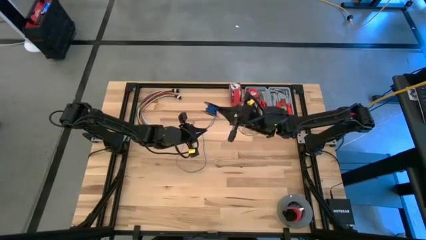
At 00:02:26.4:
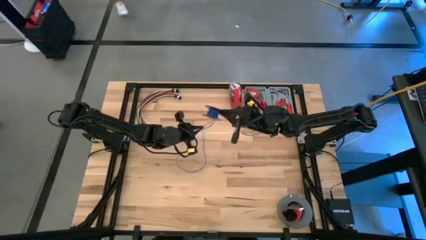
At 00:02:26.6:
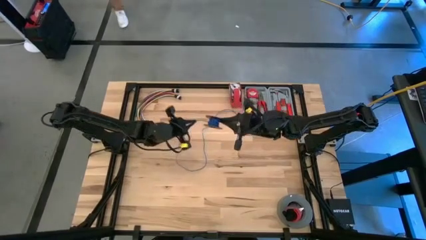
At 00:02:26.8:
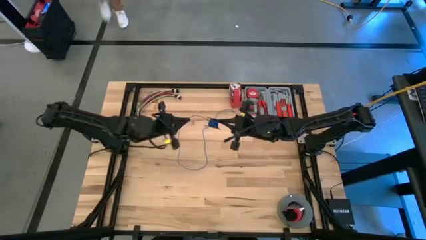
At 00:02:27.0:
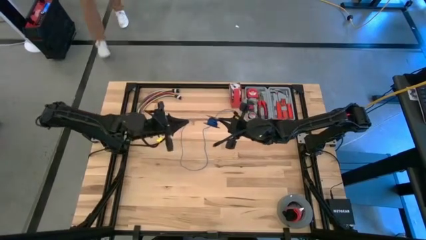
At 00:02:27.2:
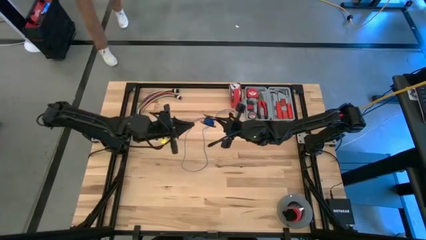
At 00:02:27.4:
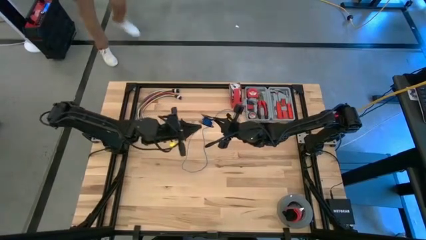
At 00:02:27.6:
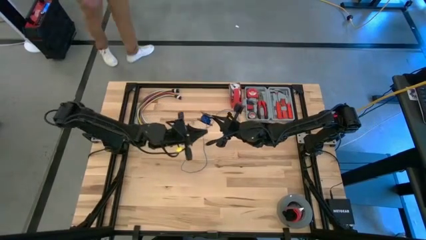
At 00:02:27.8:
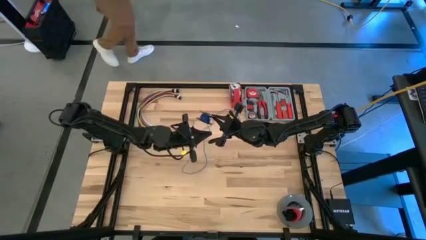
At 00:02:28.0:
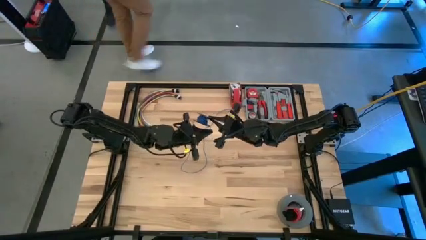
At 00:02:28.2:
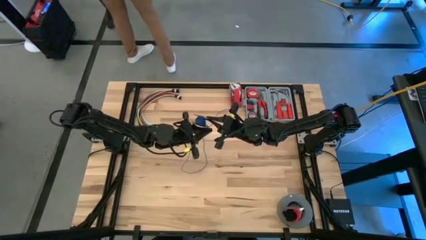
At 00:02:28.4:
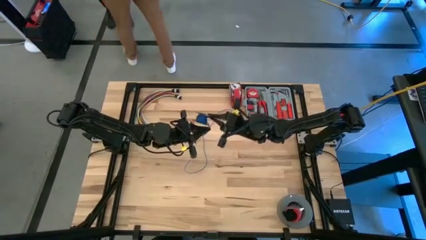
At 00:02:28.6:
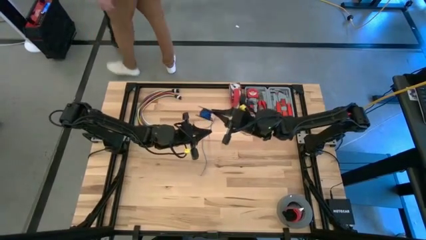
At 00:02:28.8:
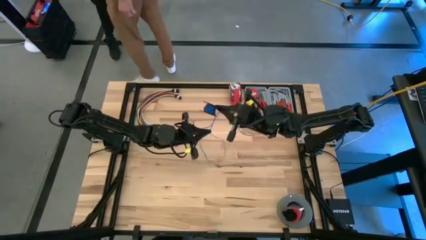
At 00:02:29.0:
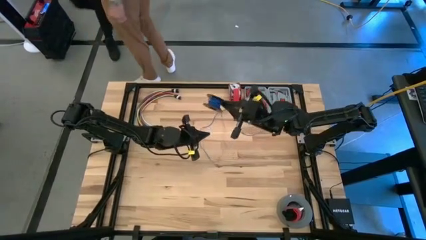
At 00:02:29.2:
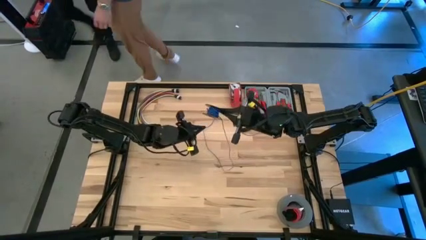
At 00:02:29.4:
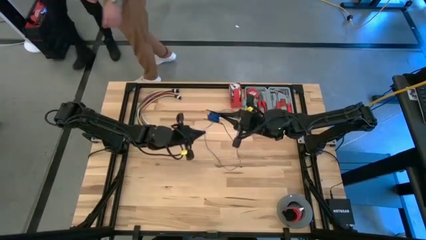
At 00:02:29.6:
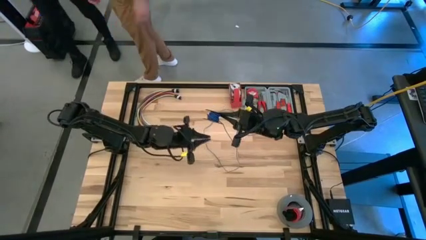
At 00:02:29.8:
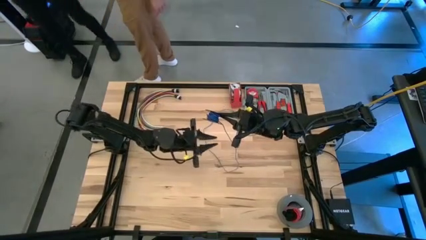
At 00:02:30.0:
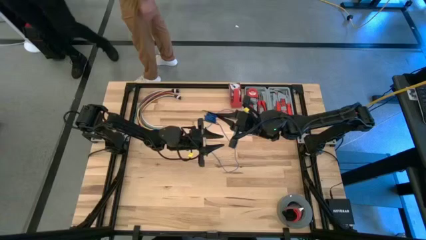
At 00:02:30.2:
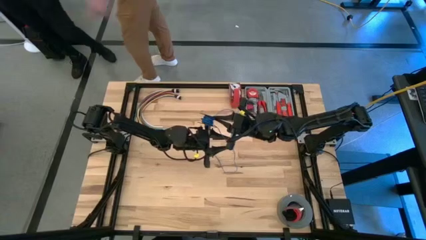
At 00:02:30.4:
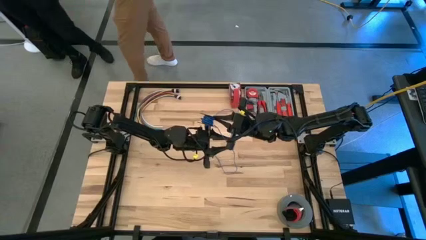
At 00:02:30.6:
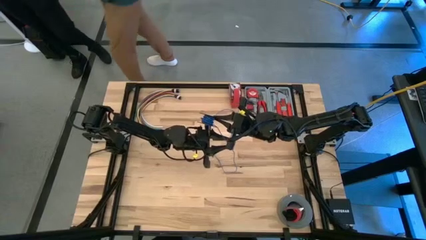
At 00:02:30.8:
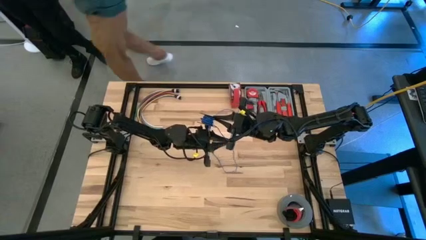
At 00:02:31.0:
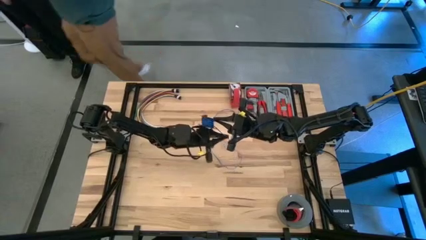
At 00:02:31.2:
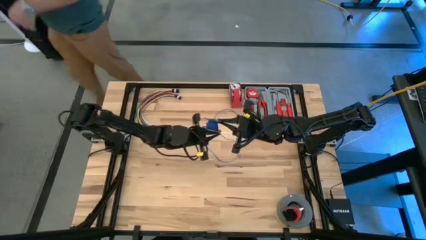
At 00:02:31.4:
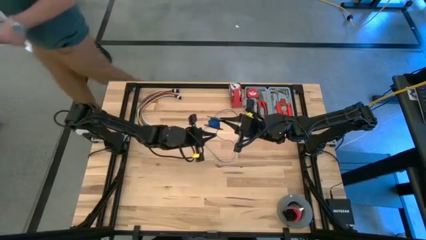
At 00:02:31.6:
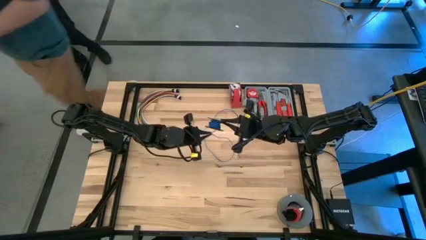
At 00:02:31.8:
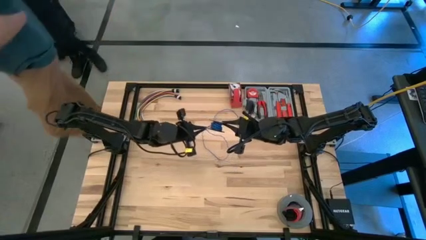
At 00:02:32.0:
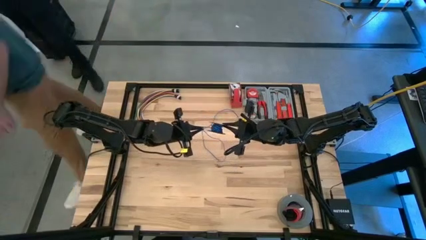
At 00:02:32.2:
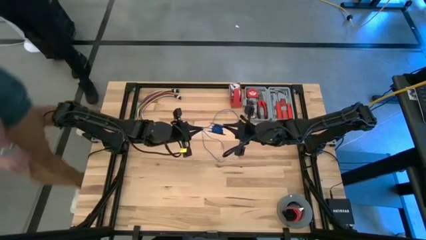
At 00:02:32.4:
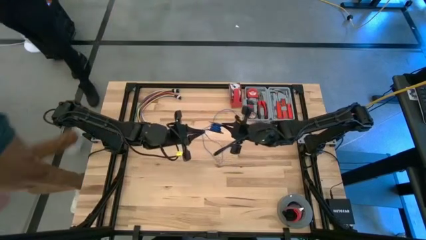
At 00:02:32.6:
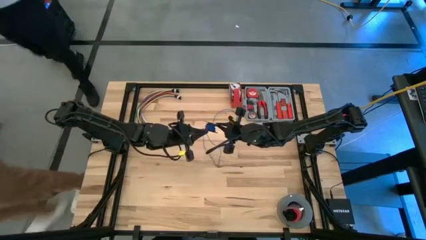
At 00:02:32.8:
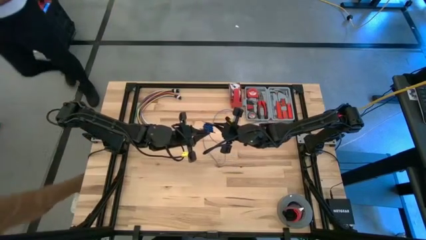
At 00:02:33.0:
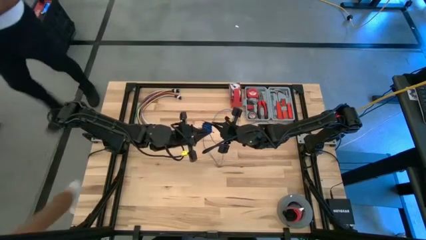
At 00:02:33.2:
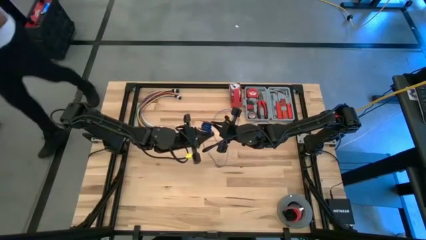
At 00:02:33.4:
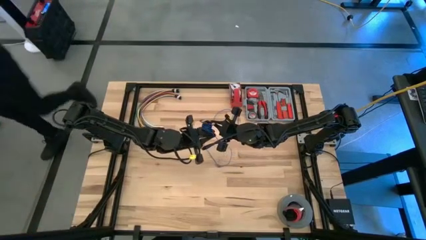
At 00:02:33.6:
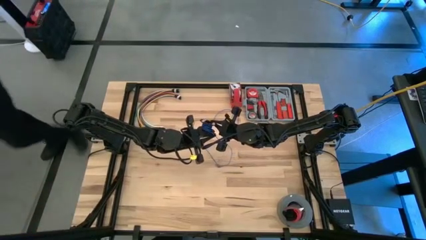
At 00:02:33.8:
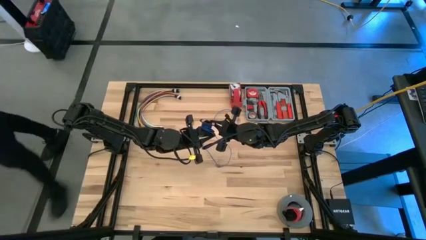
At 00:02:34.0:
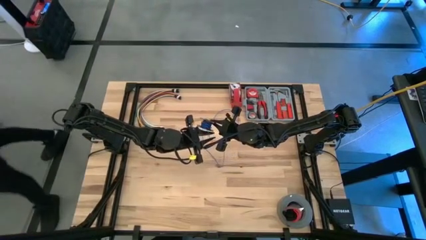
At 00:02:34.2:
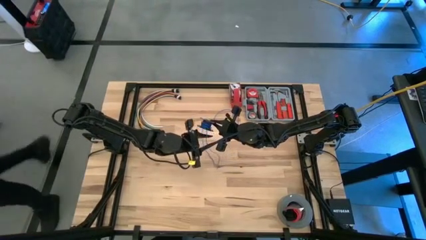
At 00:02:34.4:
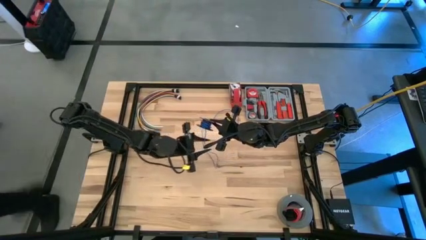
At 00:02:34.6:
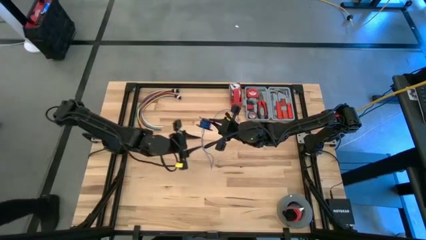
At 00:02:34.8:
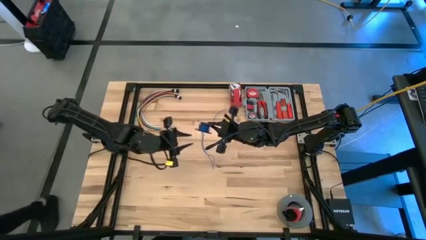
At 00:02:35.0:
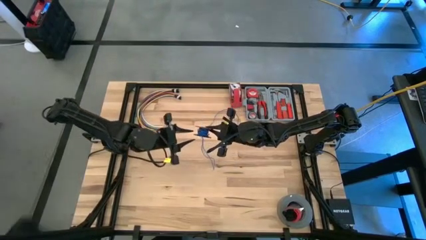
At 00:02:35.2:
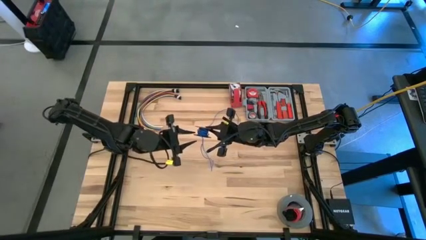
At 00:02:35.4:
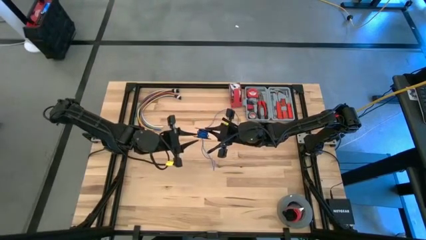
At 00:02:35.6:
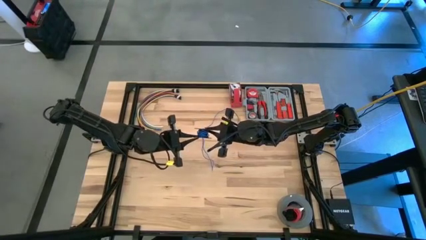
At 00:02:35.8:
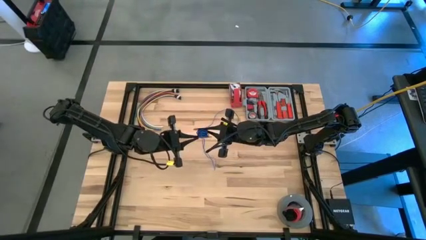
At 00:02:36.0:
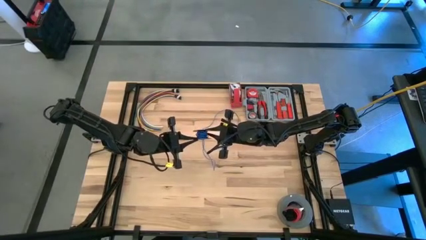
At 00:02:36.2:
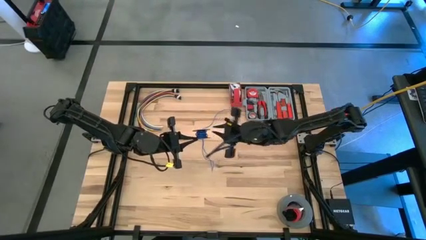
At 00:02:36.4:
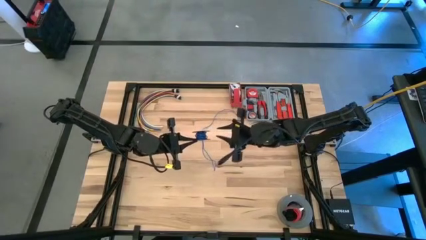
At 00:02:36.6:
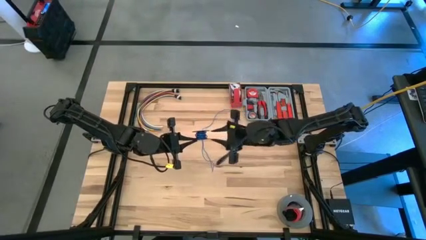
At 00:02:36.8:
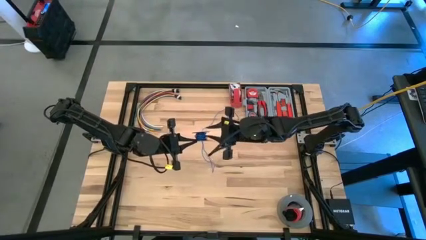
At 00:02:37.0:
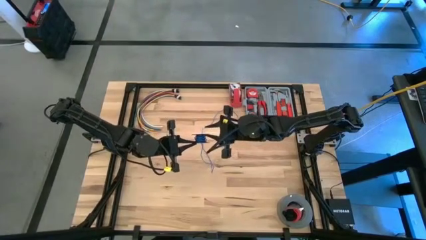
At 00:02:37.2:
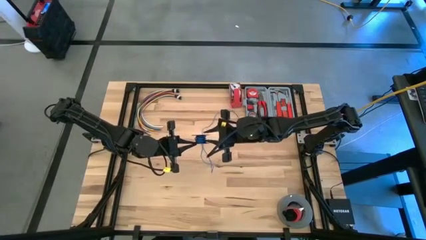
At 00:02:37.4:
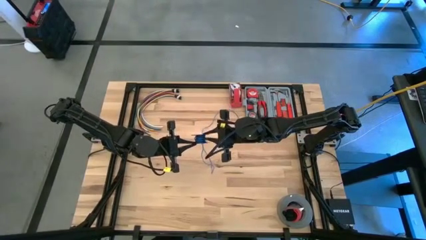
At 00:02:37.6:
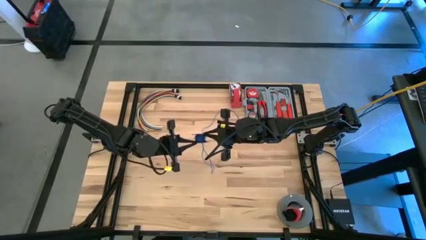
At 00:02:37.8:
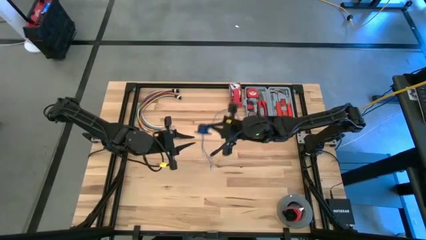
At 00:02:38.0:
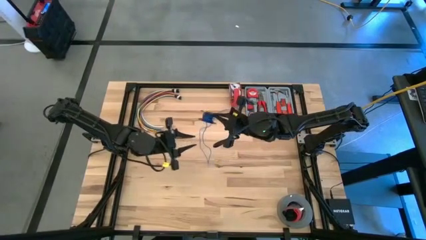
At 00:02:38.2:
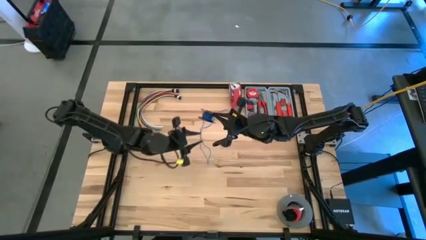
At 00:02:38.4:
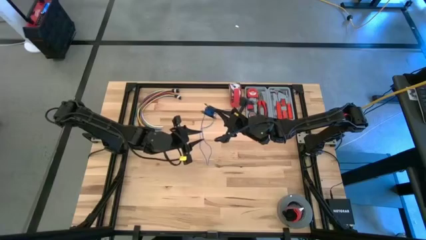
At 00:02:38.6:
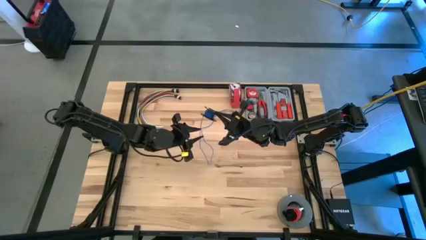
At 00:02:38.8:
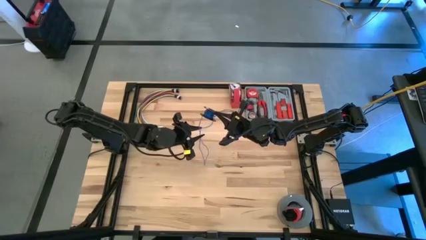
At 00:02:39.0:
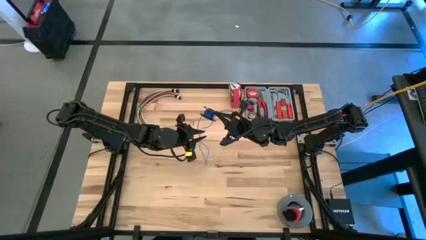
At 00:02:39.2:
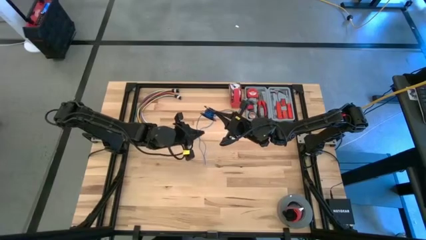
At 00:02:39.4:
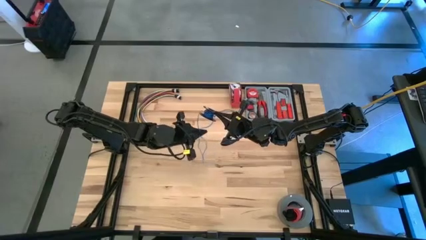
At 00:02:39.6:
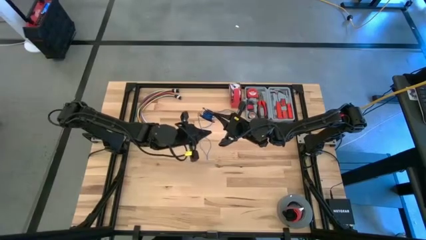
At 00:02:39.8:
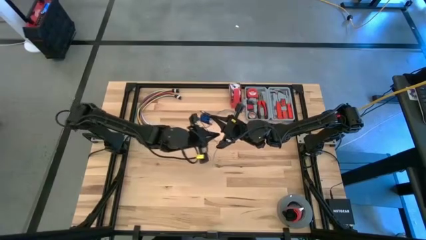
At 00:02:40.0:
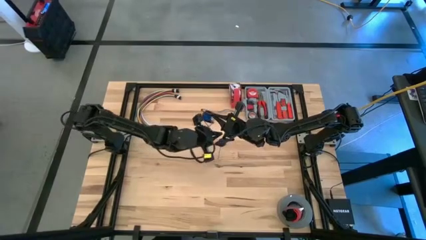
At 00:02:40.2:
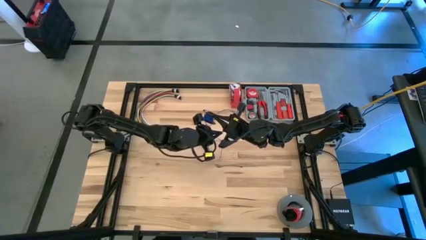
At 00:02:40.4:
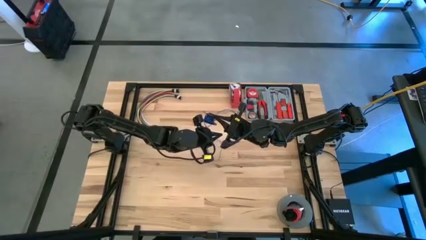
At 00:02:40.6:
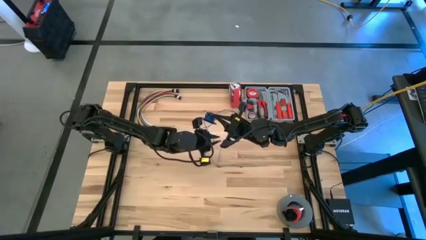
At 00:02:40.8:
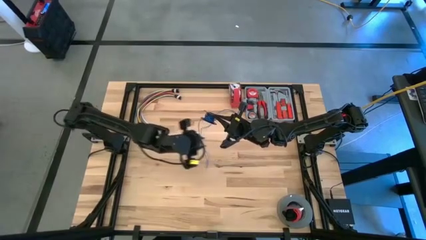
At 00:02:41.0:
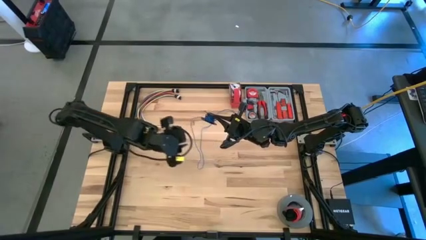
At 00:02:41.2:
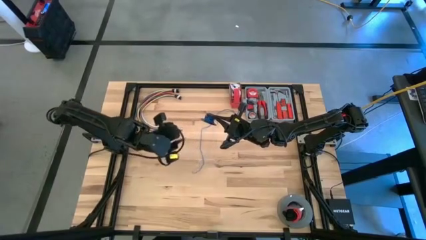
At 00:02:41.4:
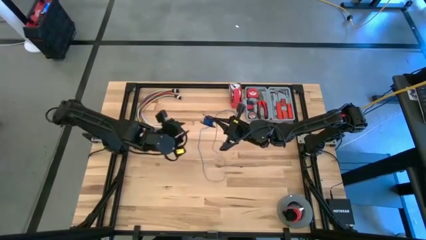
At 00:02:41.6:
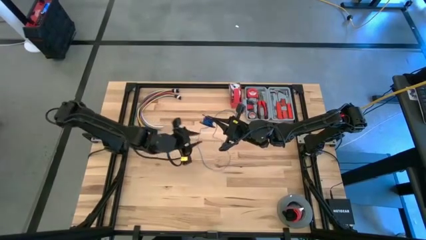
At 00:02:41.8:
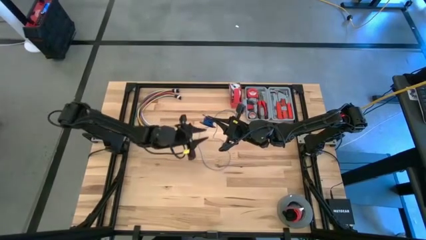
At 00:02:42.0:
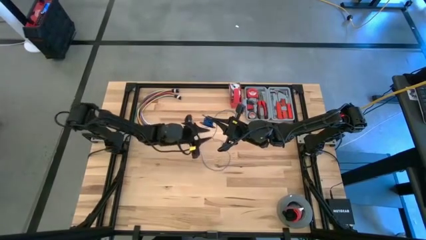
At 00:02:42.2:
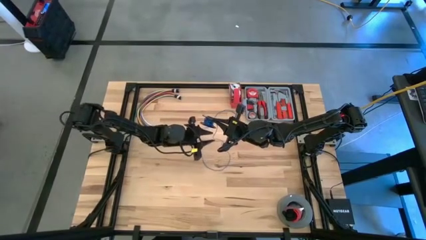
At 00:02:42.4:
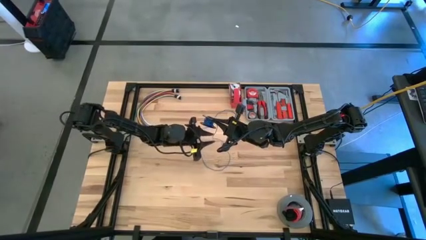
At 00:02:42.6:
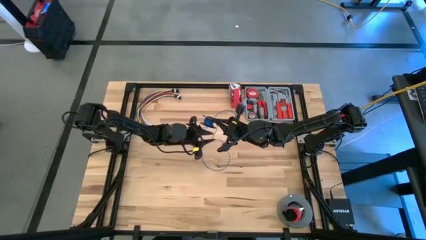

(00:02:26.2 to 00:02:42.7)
Task: Coil cords
Coil the blue wire on the black spool
